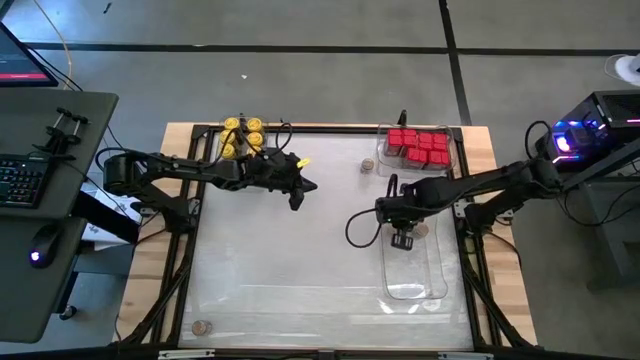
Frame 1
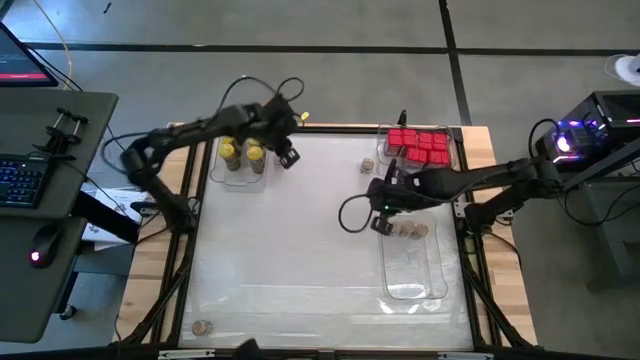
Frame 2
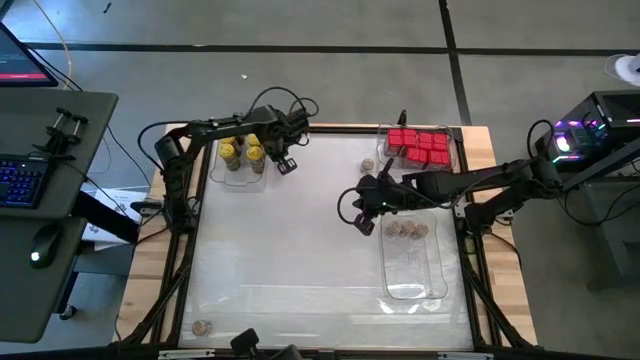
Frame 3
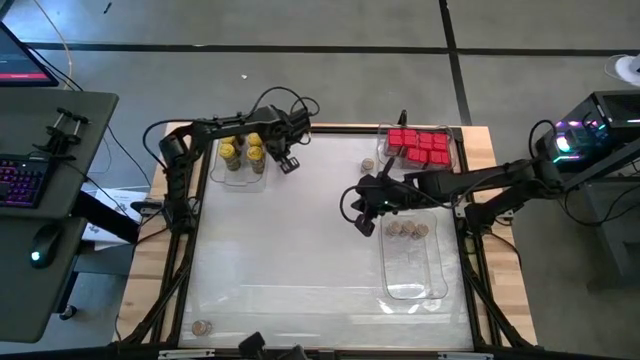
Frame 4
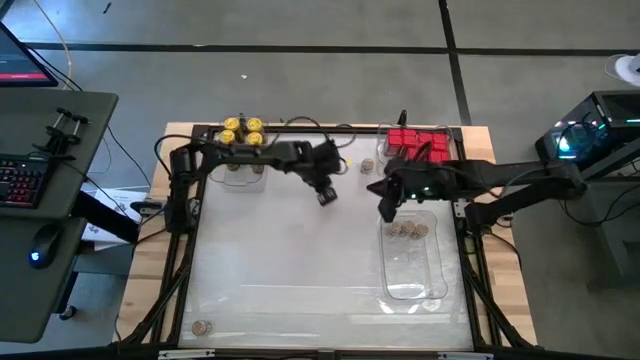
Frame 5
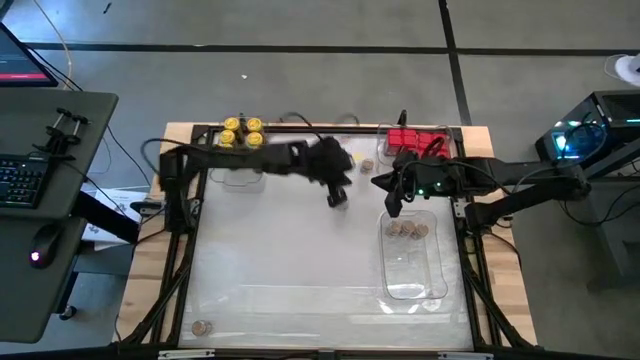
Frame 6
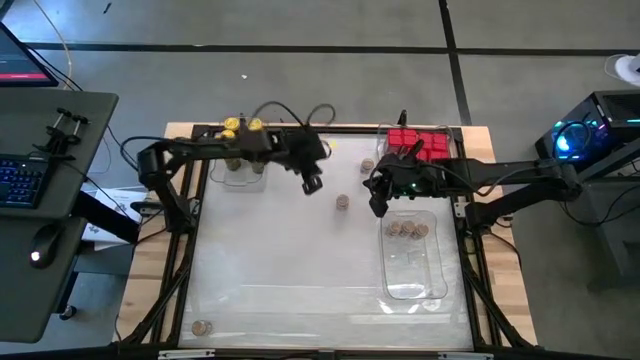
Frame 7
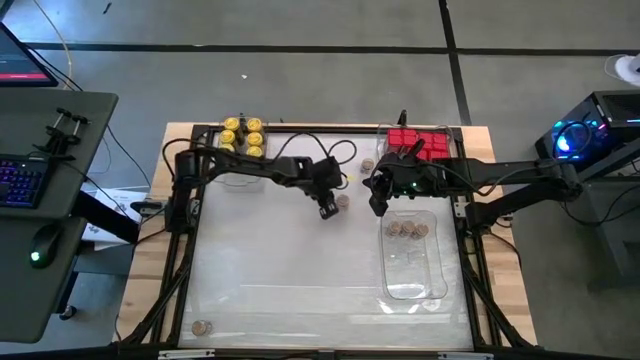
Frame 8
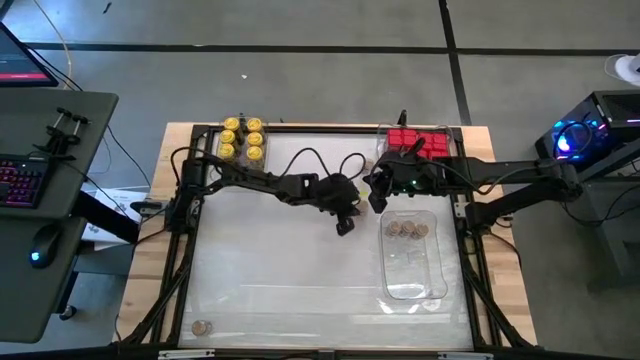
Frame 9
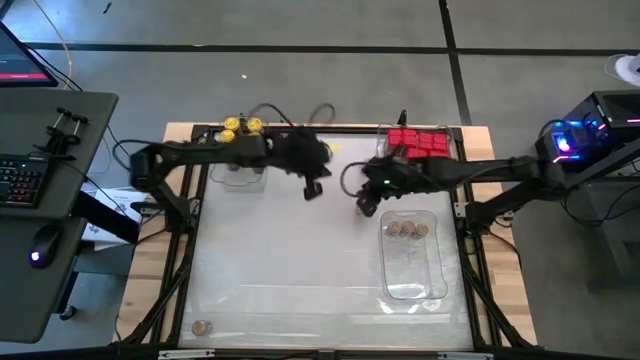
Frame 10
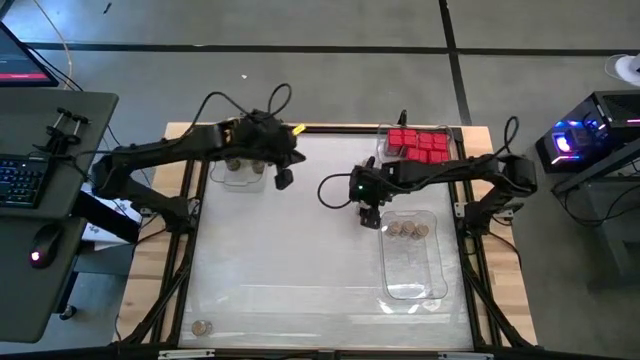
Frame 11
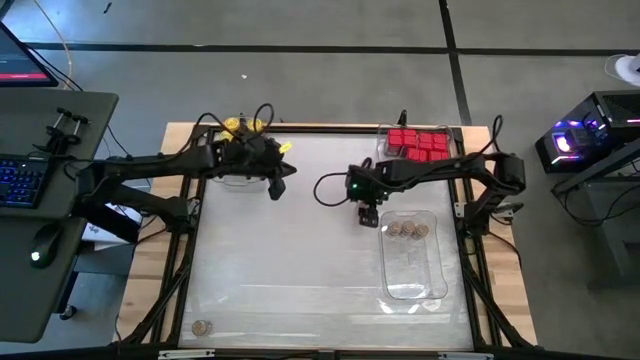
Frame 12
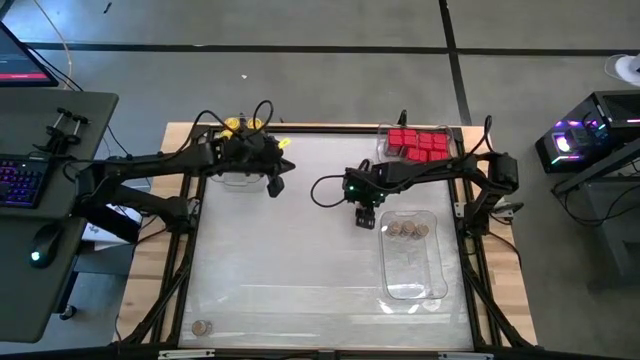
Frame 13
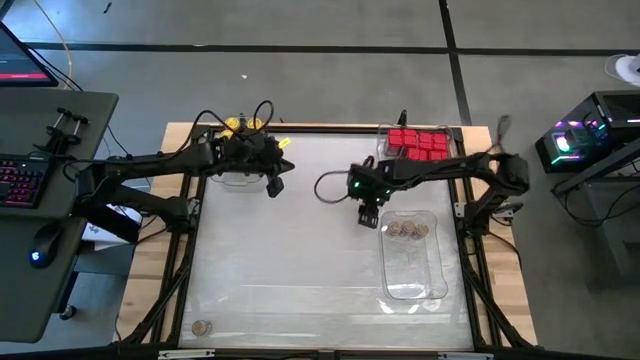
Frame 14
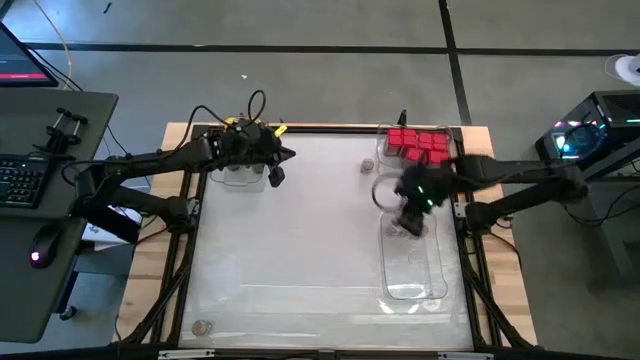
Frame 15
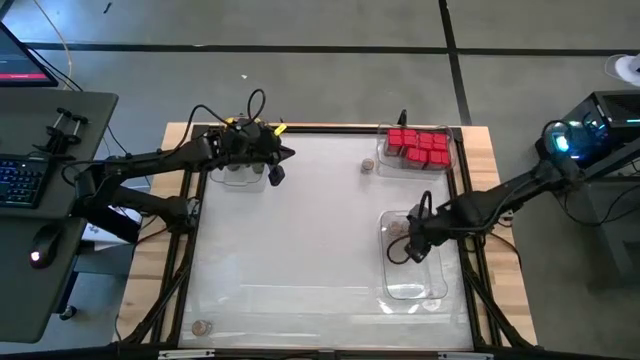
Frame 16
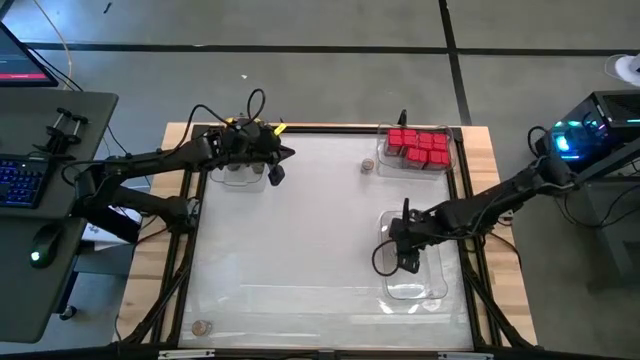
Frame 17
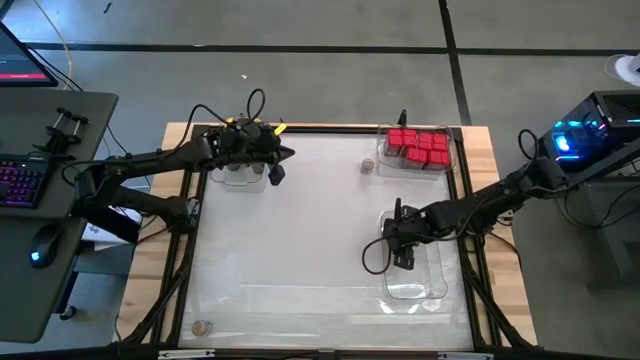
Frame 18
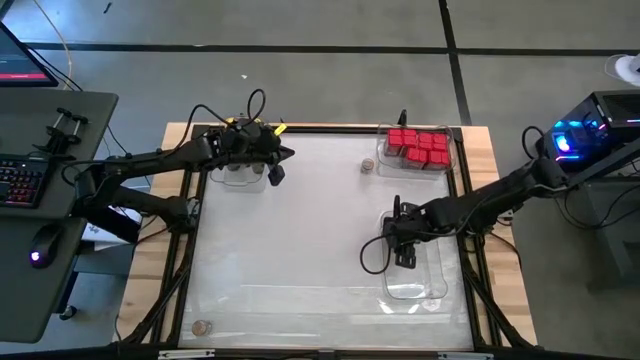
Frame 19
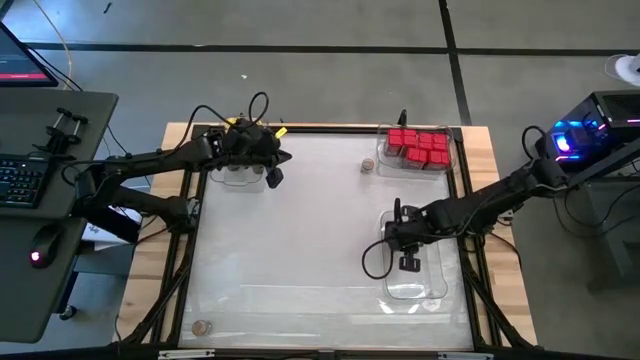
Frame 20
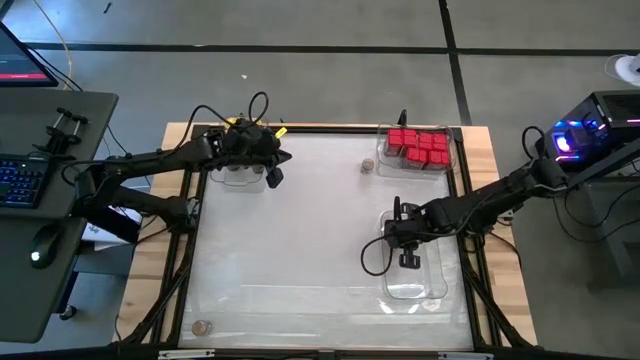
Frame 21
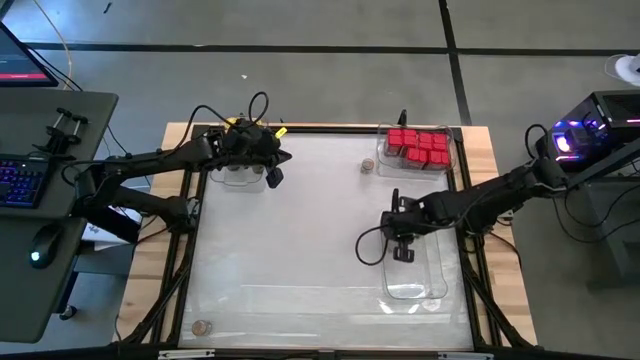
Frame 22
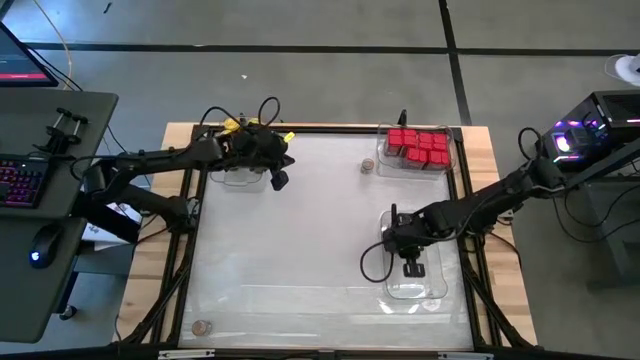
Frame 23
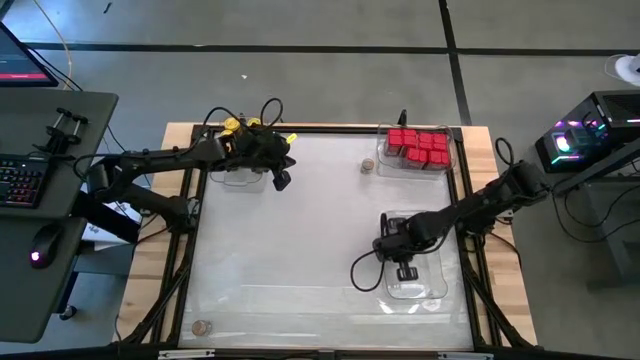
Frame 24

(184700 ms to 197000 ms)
Task: Sort spices by type
Put the brown seasoning bottle into the bottom transparent bin

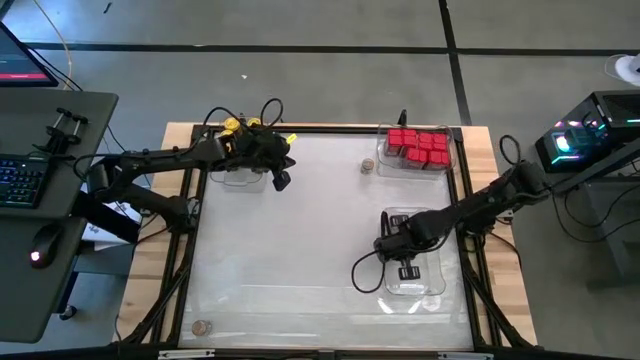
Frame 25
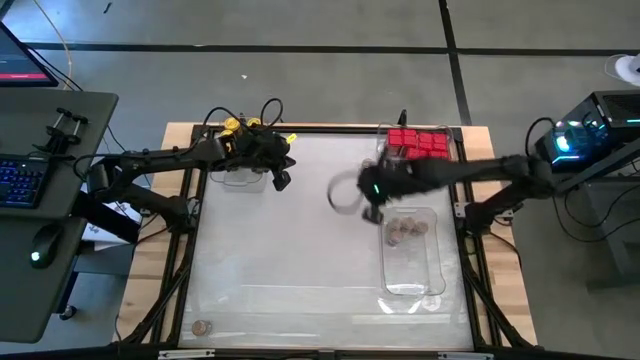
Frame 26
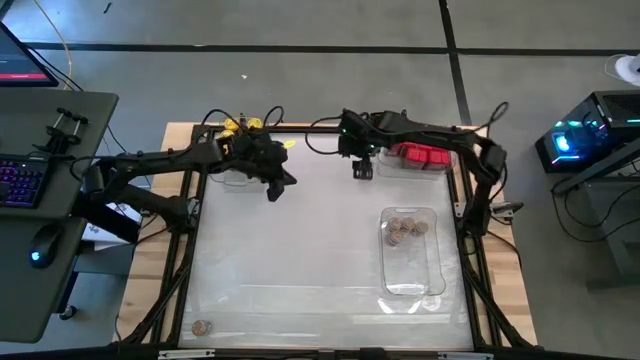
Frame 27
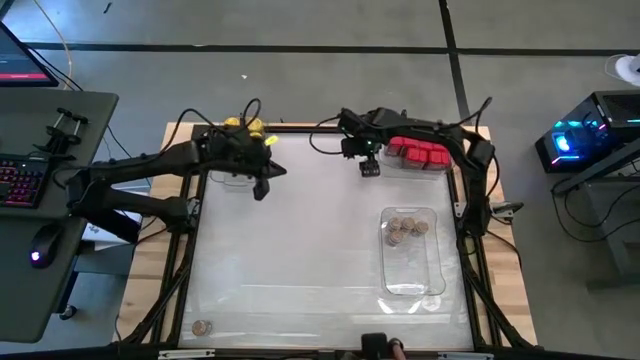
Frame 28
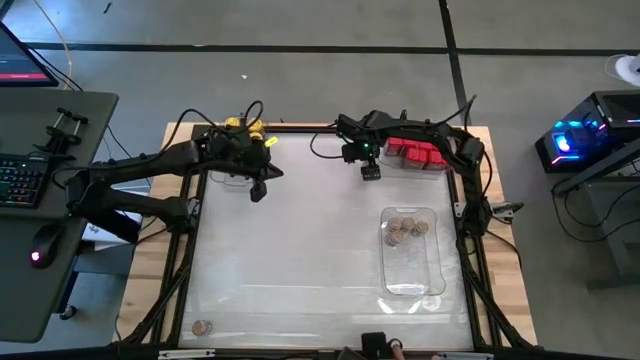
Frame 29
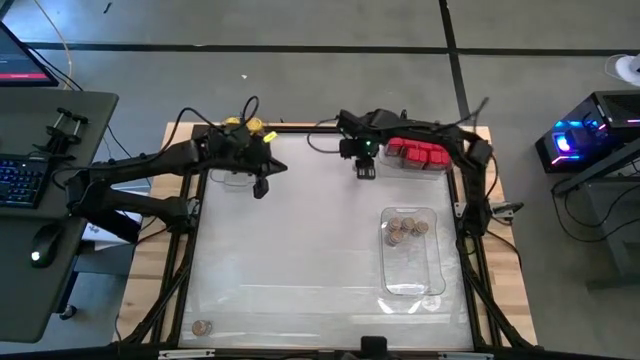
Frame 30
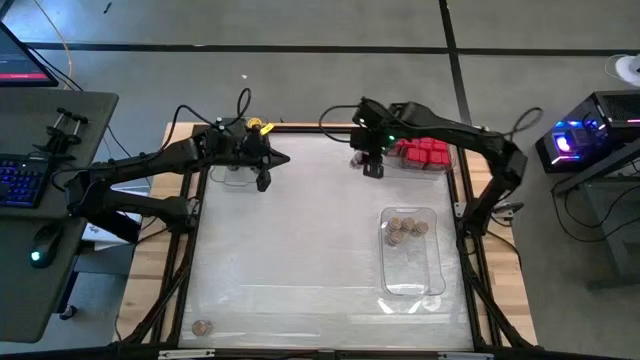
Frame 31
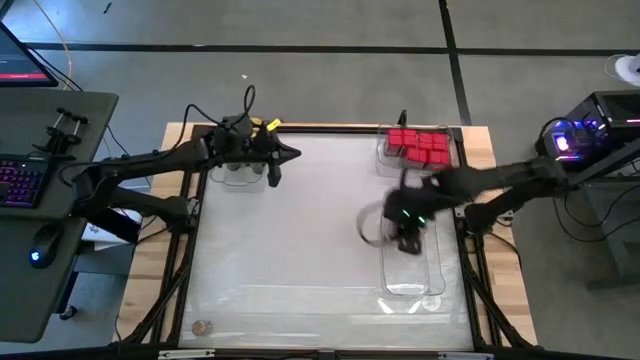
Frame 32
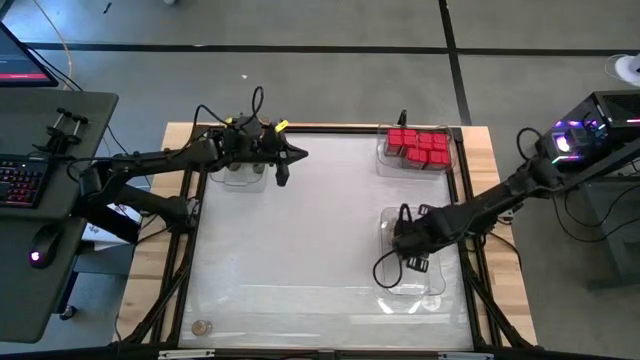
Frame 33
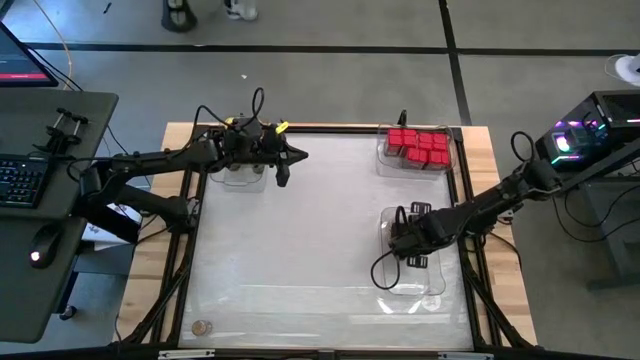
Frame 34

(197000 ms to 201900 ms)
Put the brown seasoning bottle into the bottom transparent bin

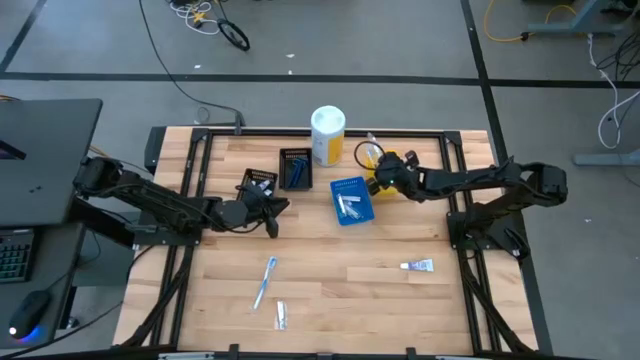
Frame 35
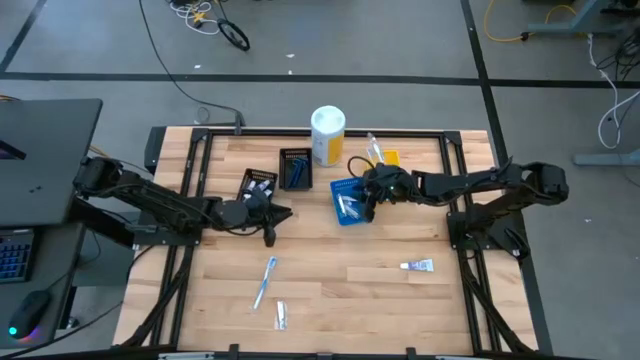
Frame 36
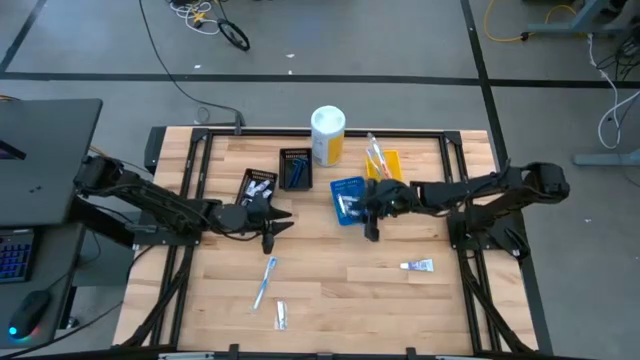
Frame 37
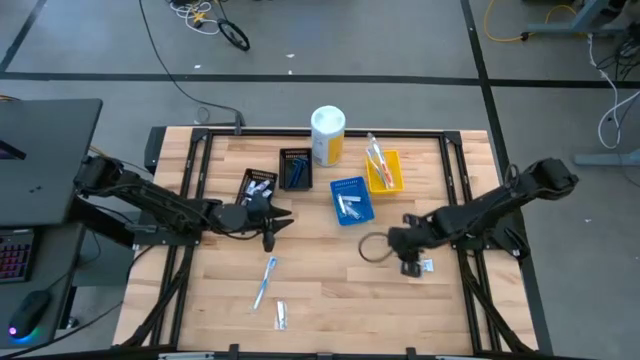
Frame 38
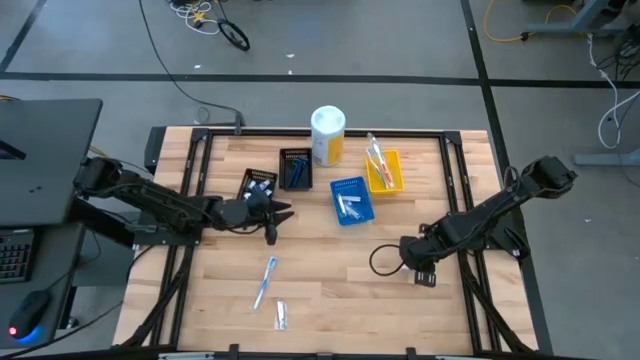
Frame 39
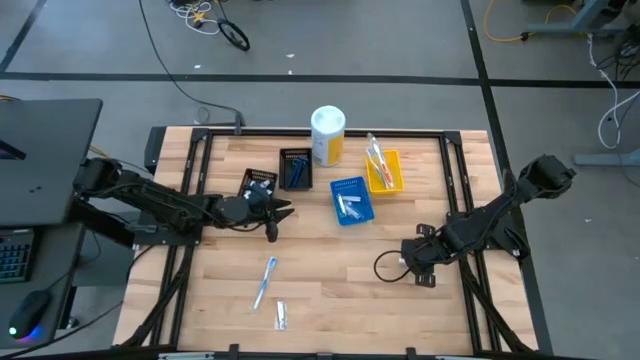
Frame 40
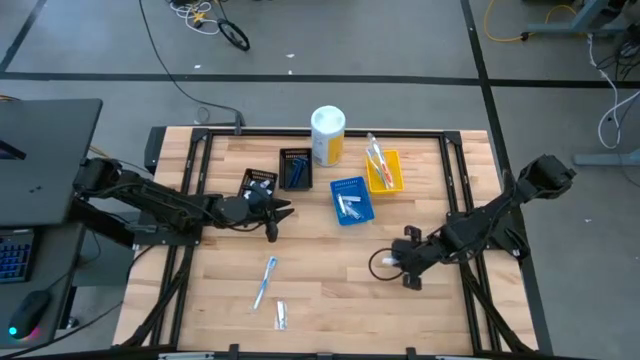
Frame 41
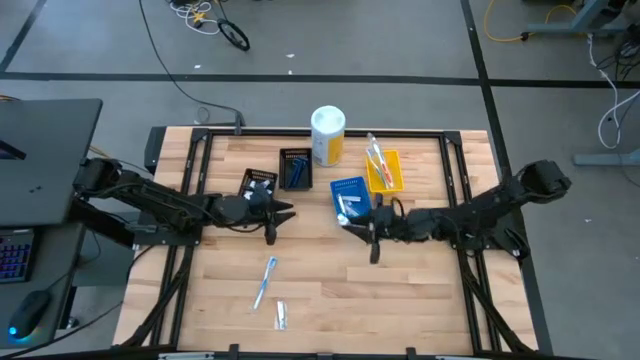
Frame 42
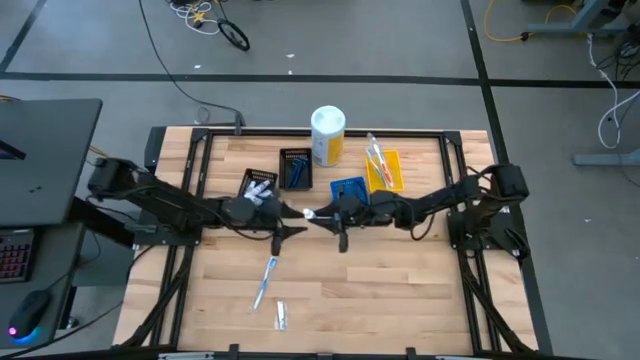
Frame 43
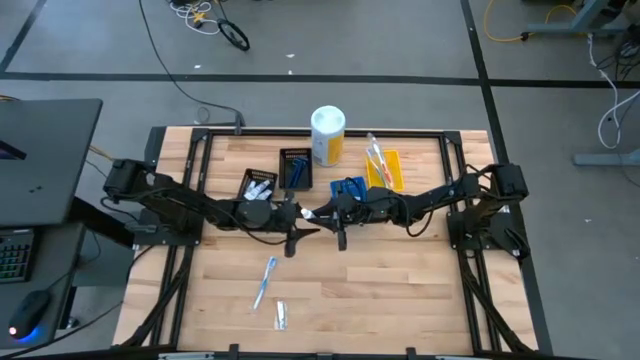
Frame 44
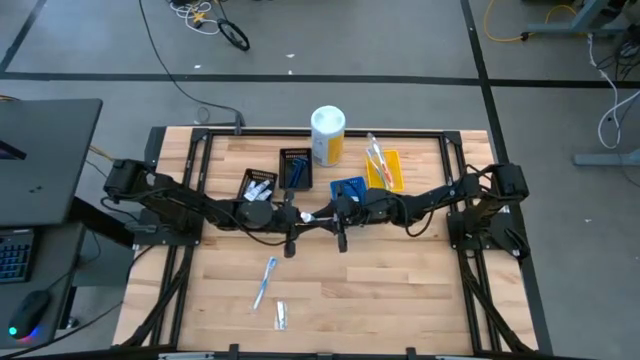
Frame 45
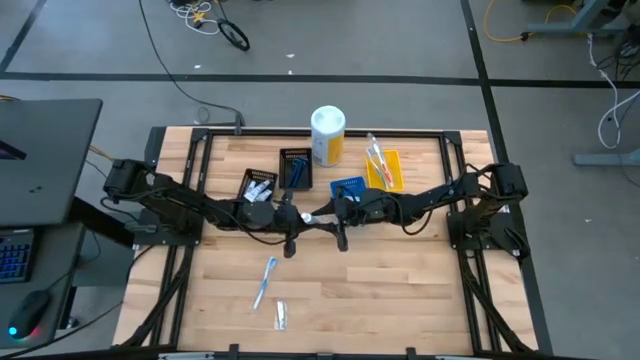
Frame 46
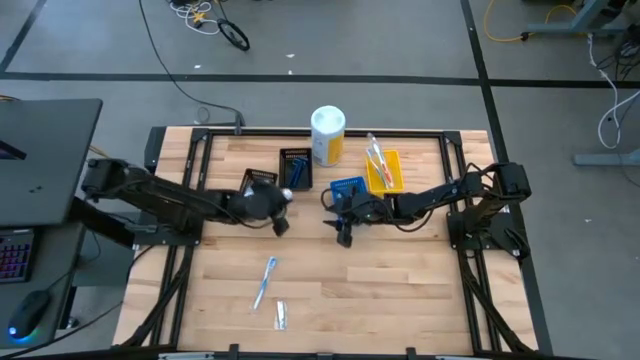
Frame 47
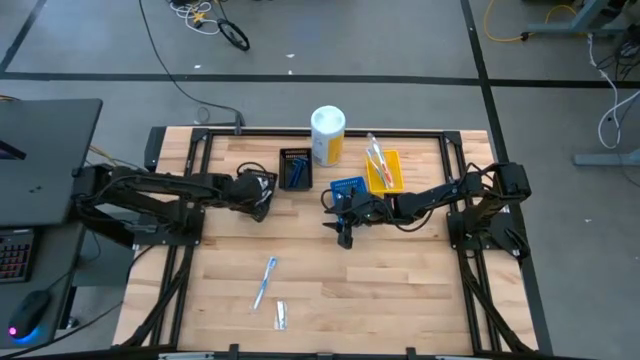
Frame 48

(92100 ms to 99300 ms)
Task: Pick & Place Travel size toiletries
Put the white toothpaste into the left black bin
